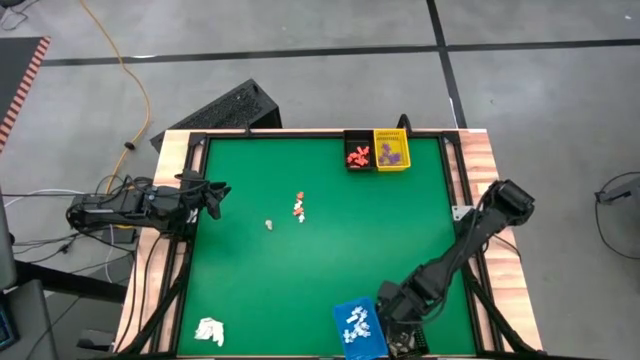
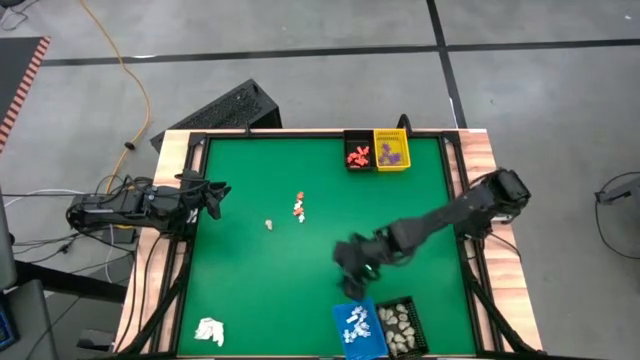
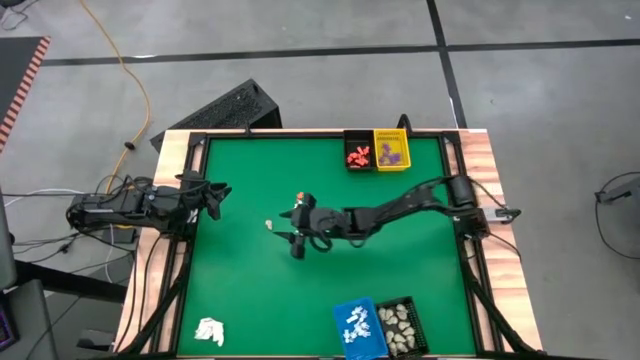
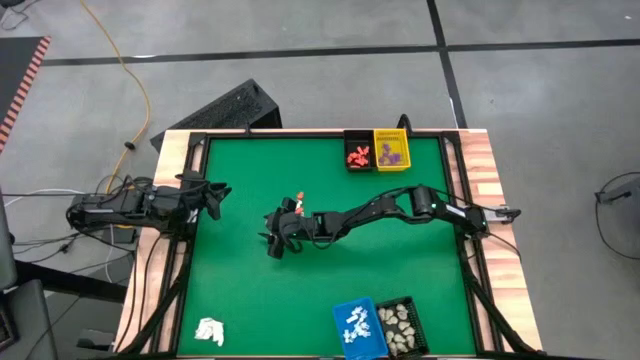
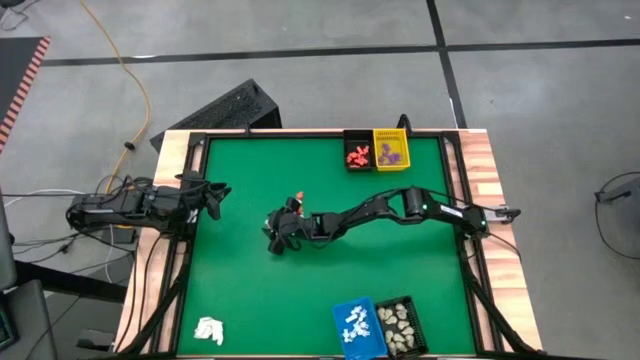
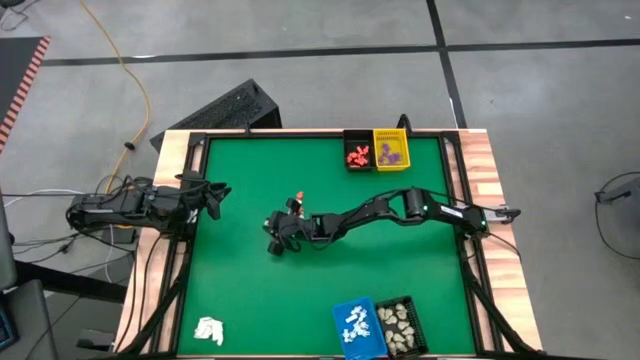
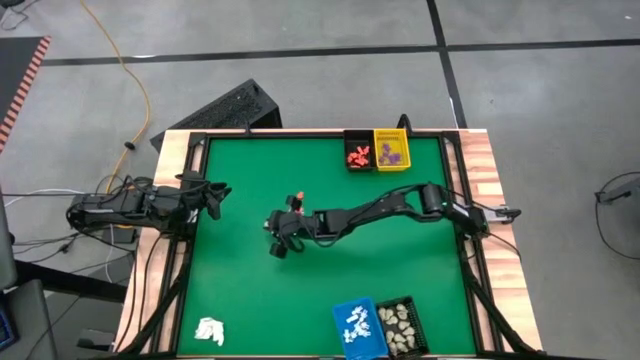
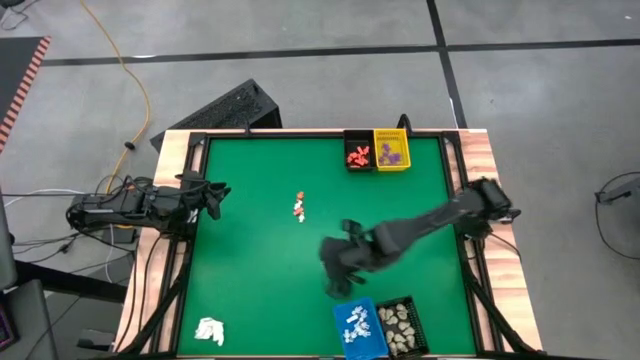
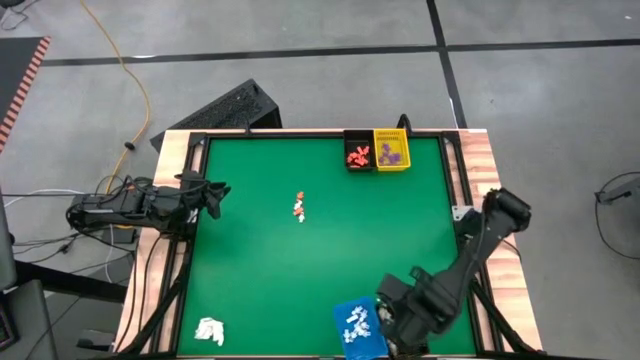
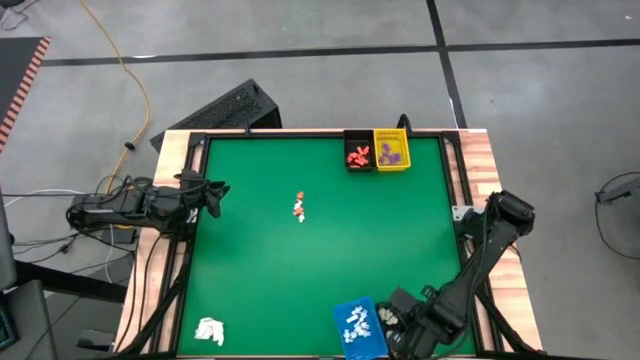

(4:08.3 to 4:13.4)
Task: Sort Halloween decoration
Put the white skull toy into the bottom black basket

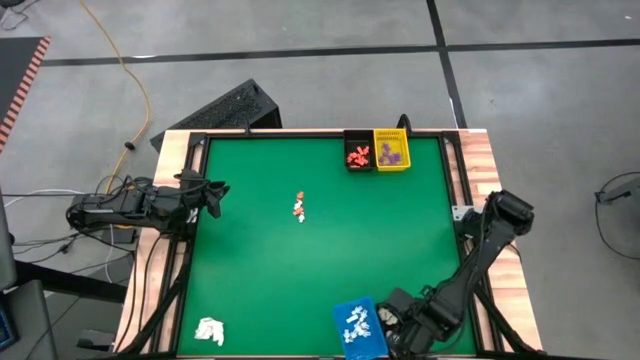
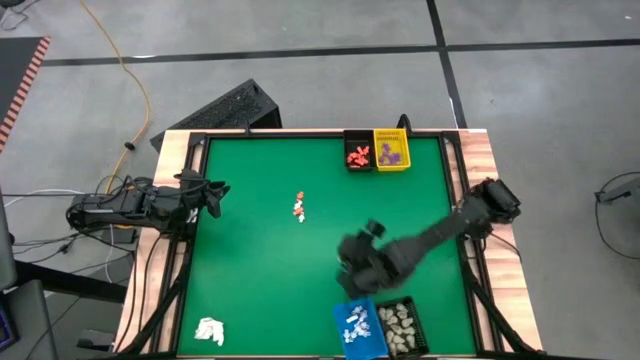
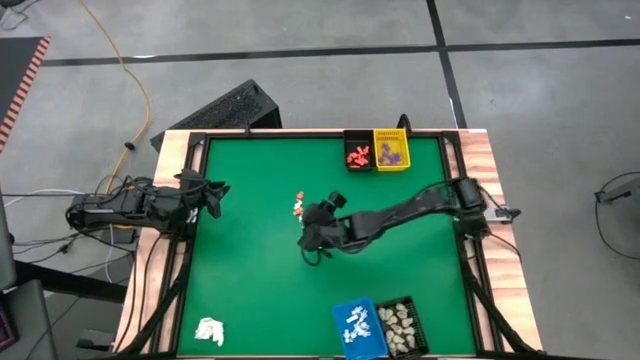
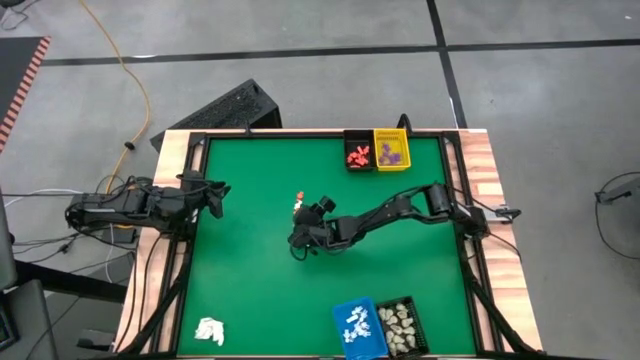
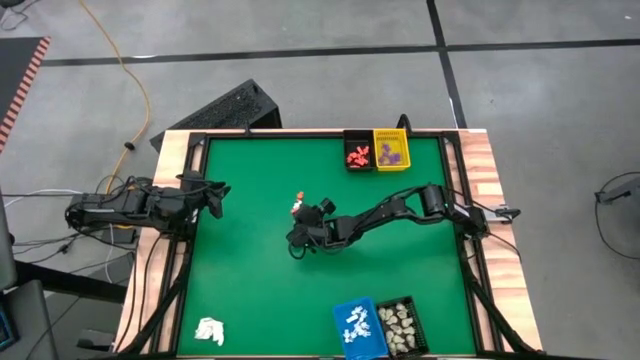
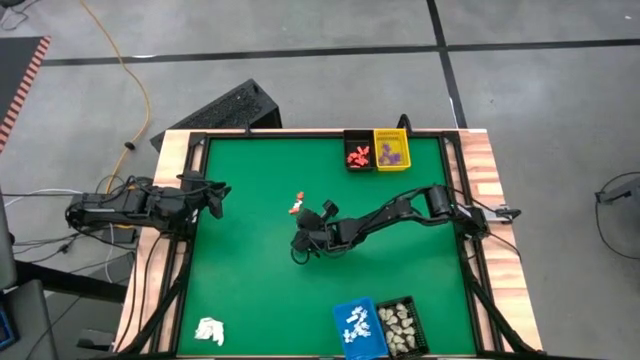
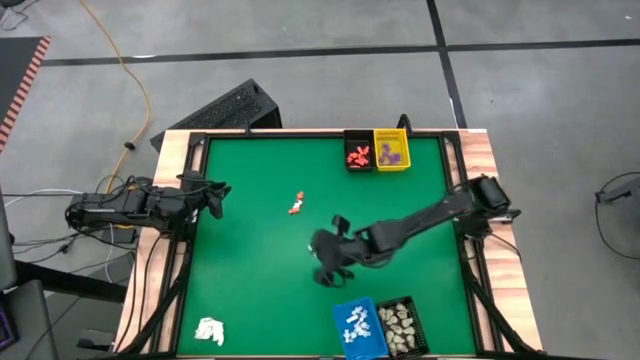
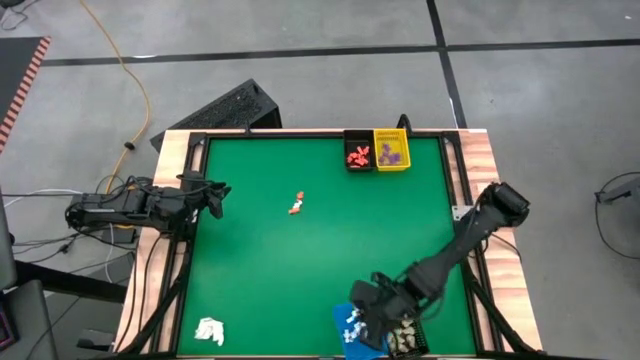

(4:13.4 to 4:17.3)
Put the white skeleton toy into the blue basket

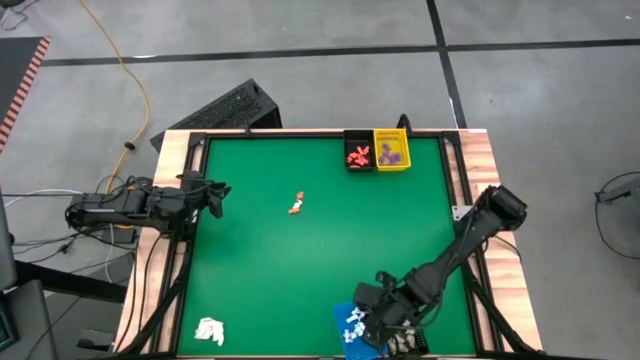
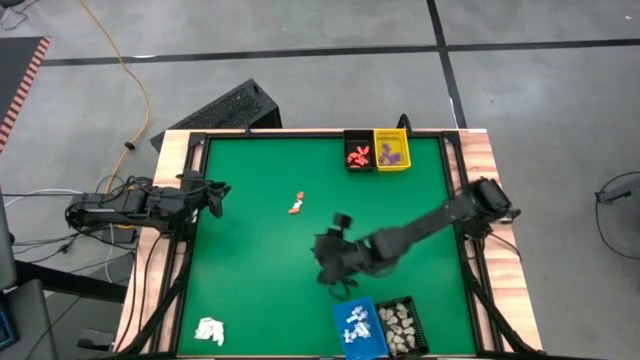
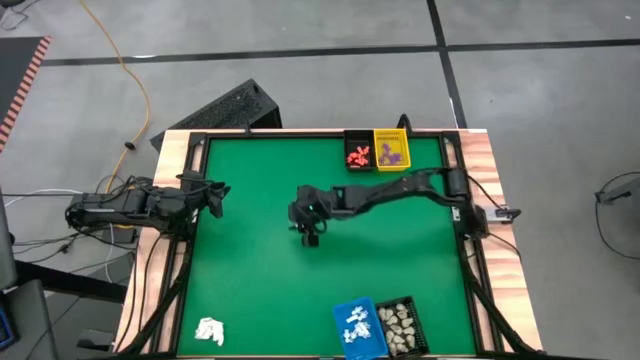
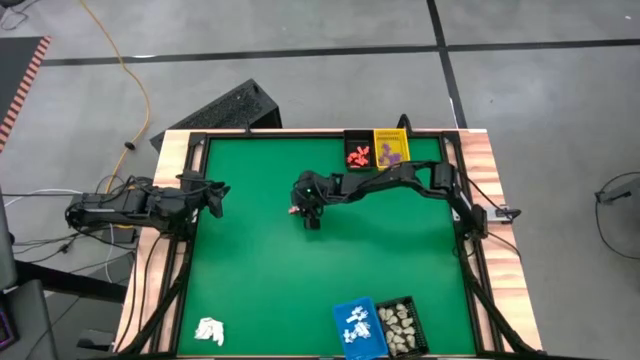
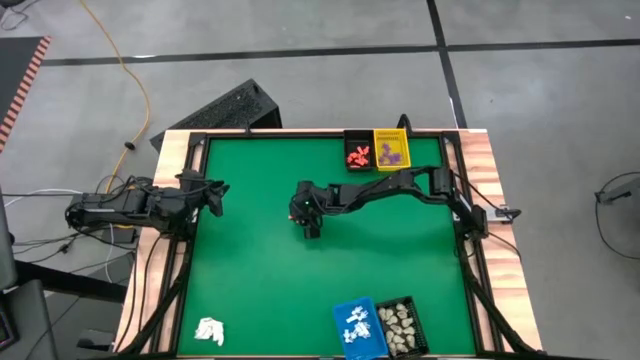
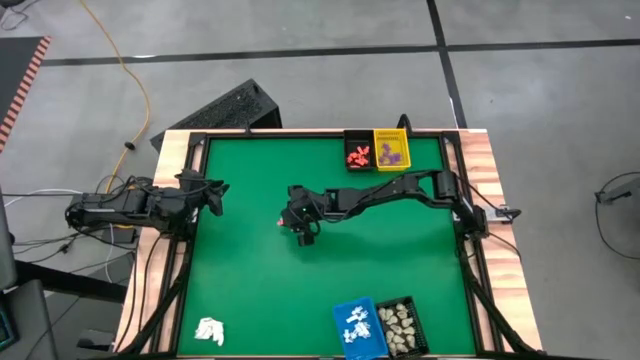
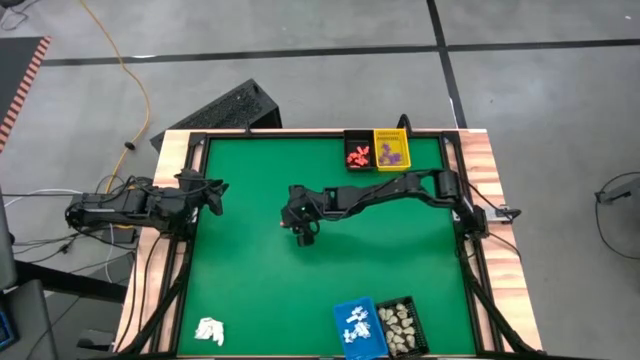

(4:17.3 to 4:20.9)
Put the white skeleton toy into the blue basket

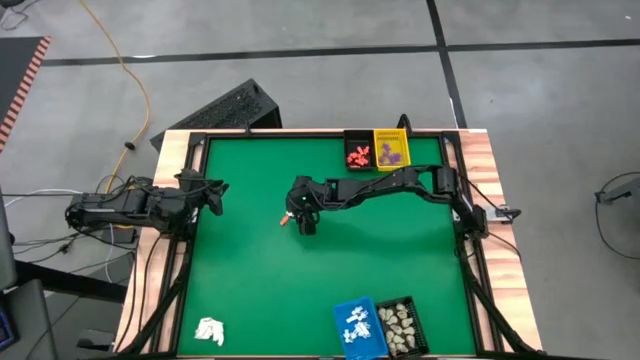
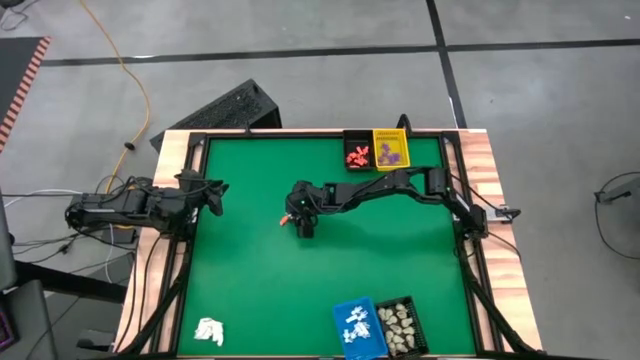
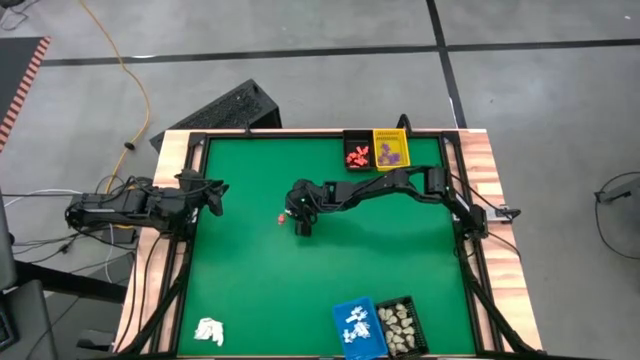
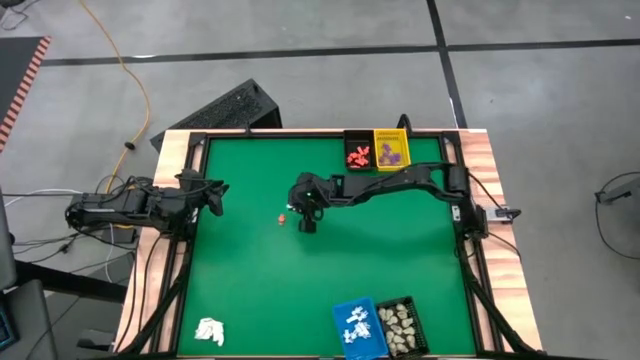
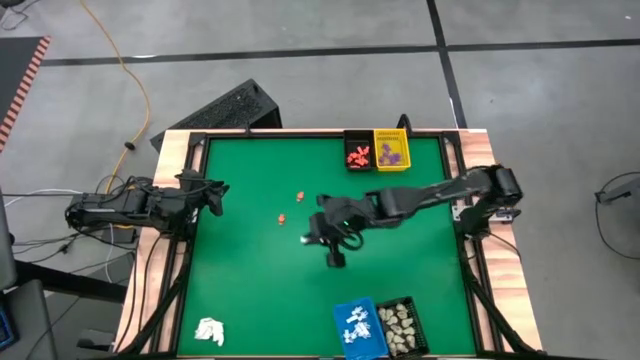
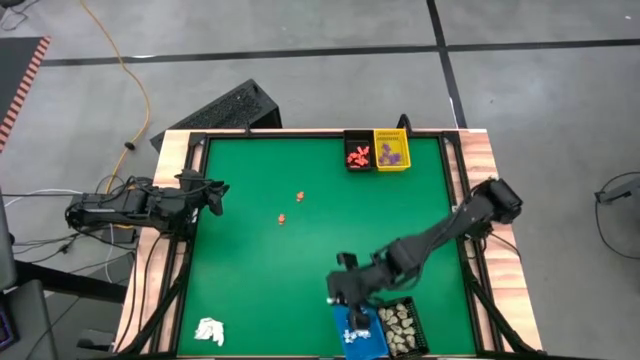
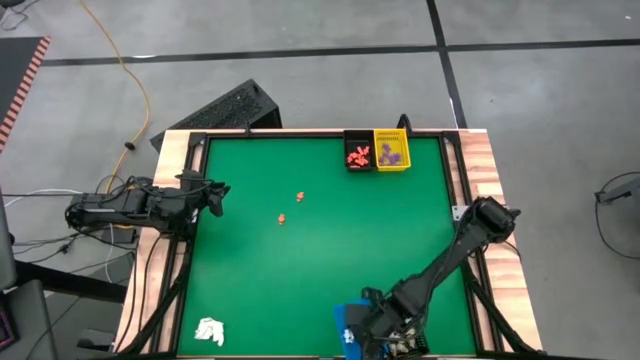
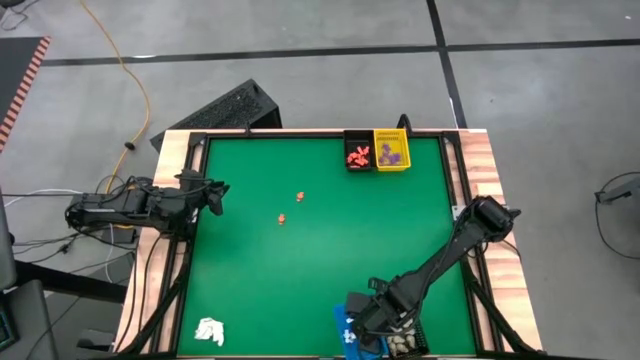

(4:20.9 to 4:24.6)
Put the white skeleton toy into the blue basket

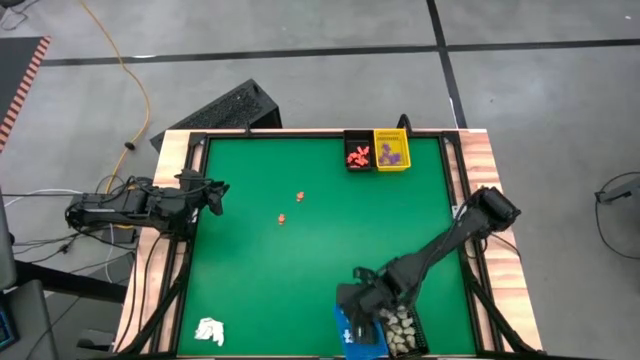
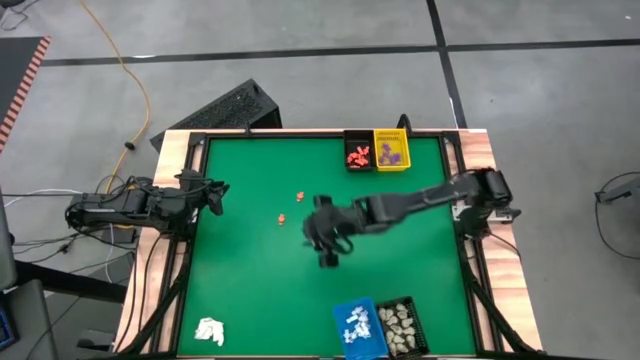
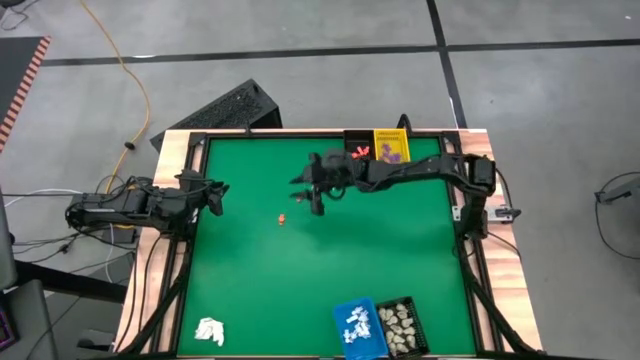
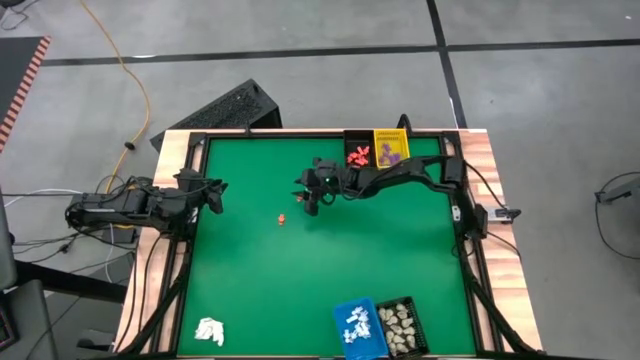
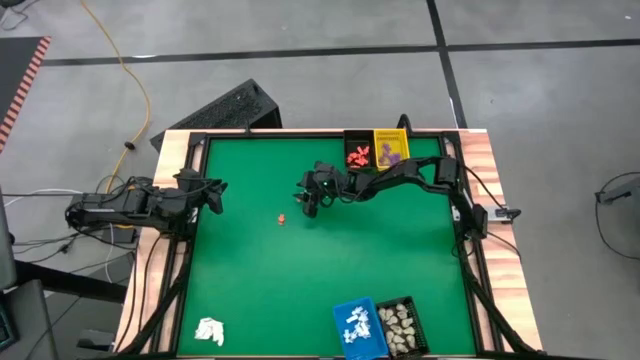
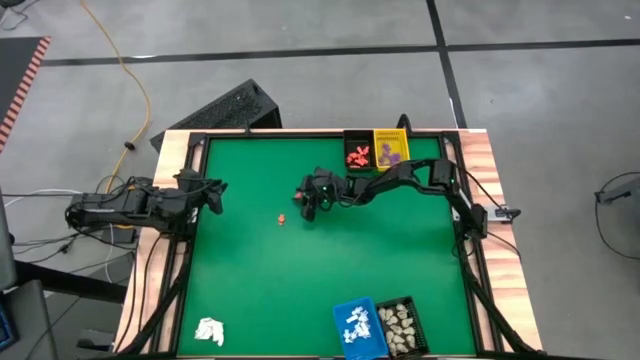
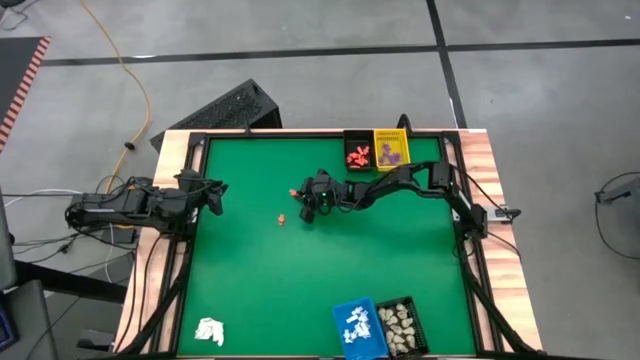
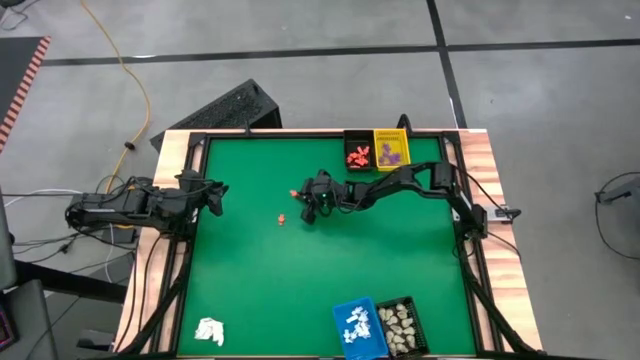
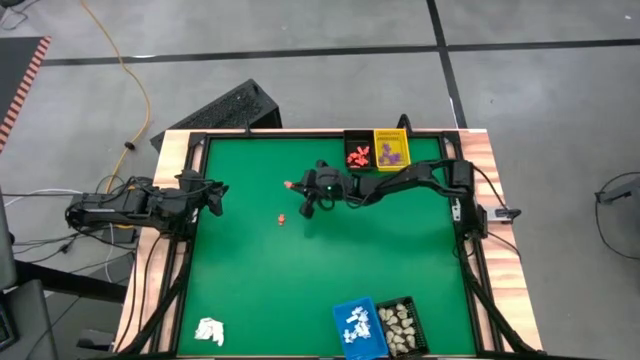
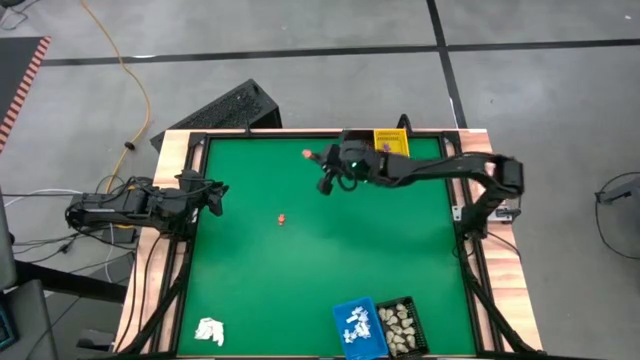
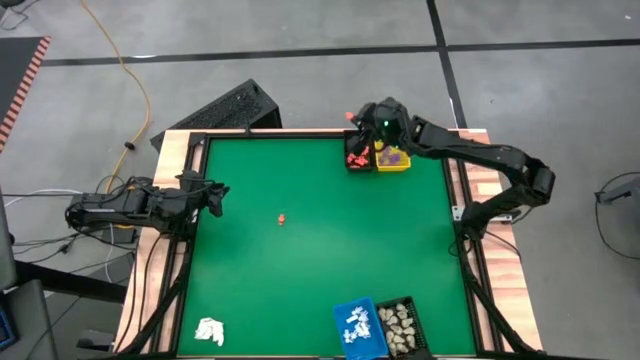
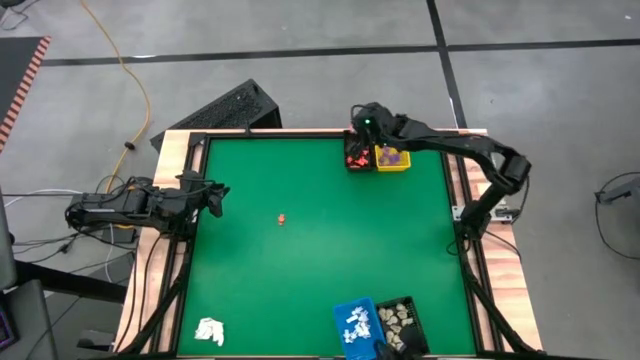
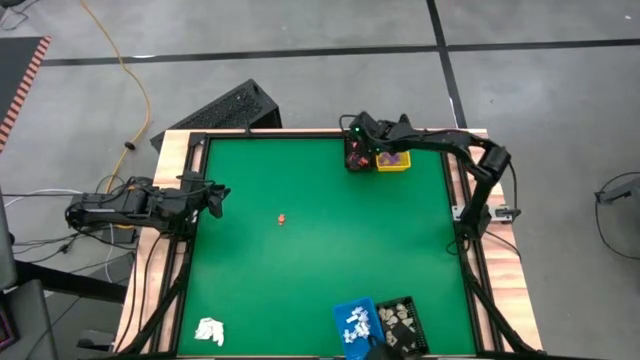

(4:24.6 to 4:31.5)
Put the orange skeleton toy into the top black basket
